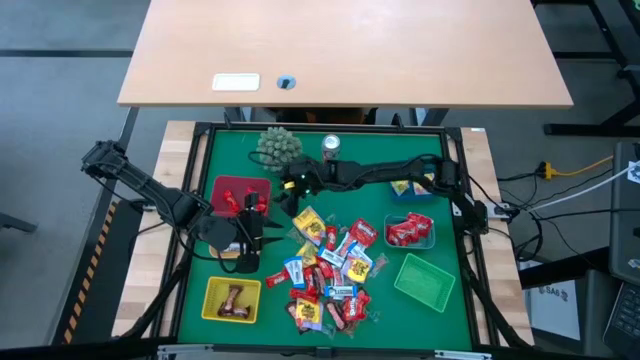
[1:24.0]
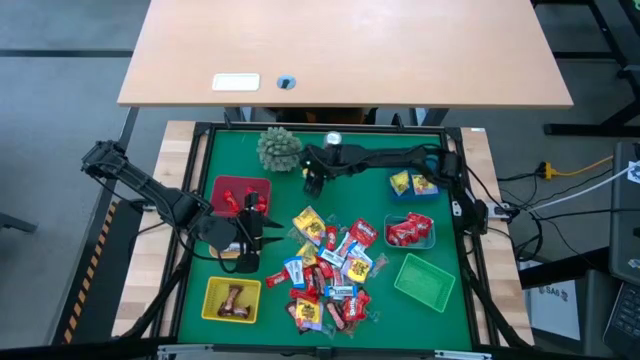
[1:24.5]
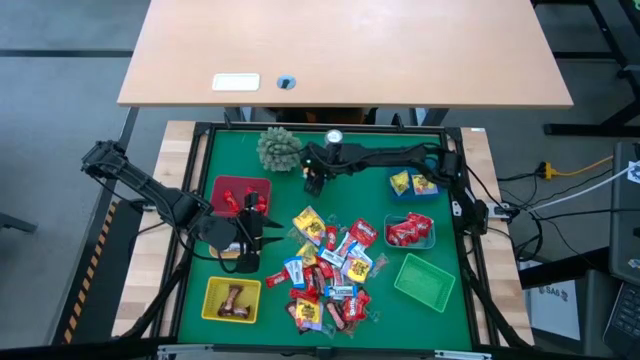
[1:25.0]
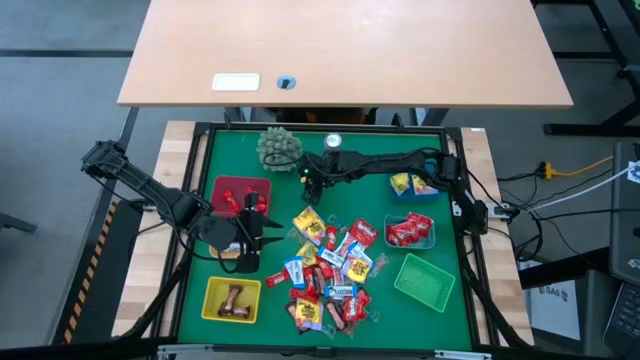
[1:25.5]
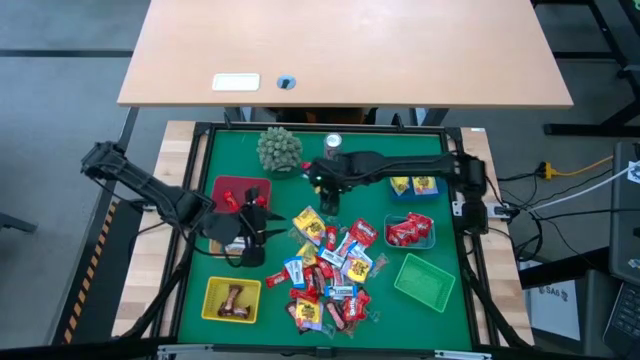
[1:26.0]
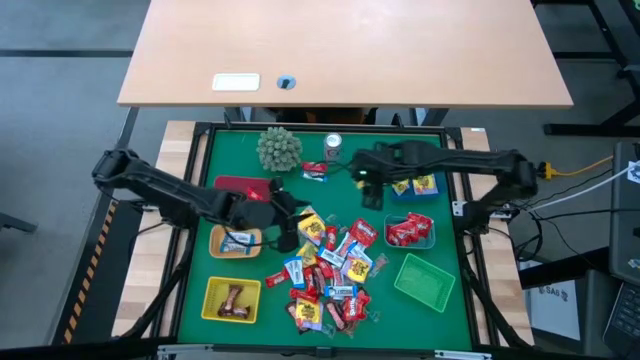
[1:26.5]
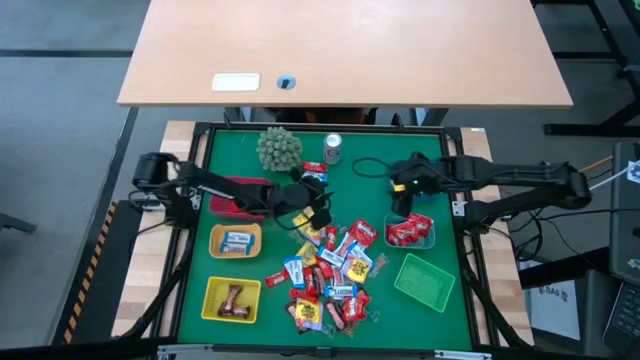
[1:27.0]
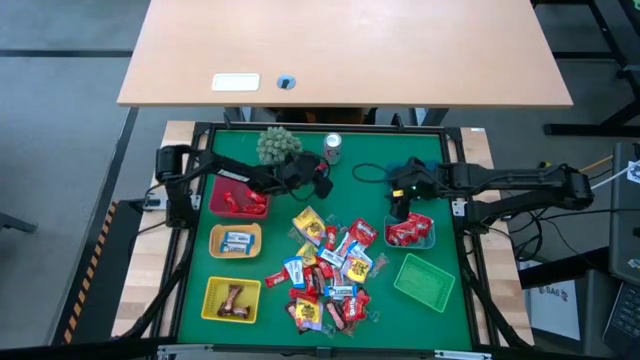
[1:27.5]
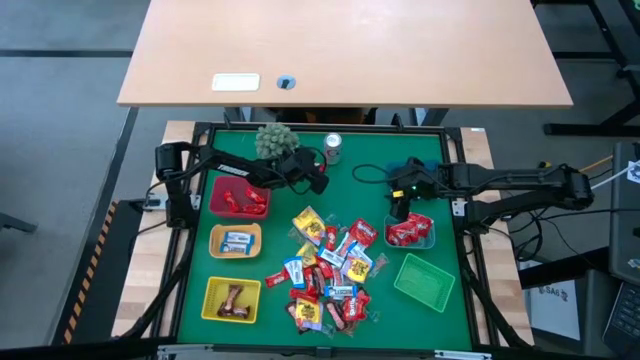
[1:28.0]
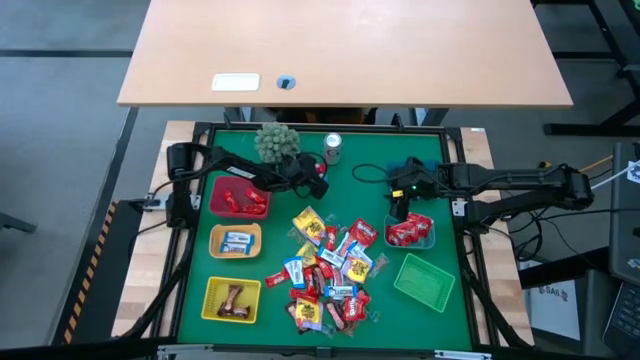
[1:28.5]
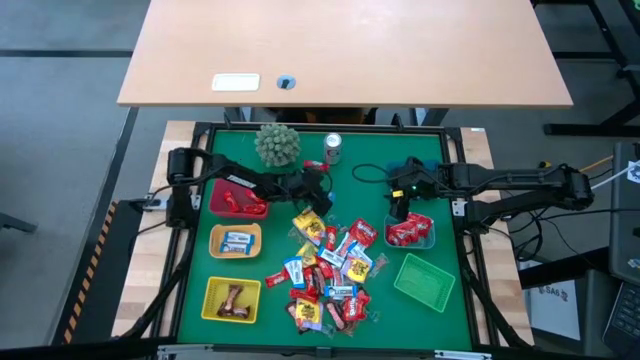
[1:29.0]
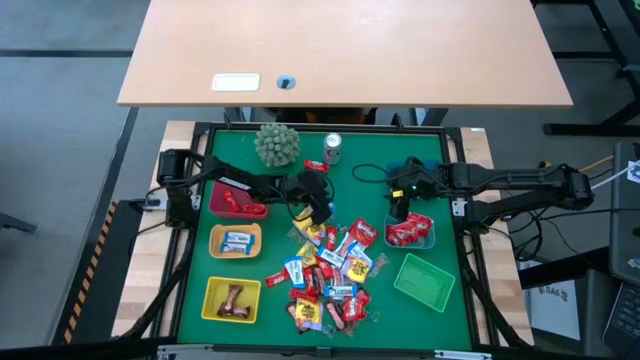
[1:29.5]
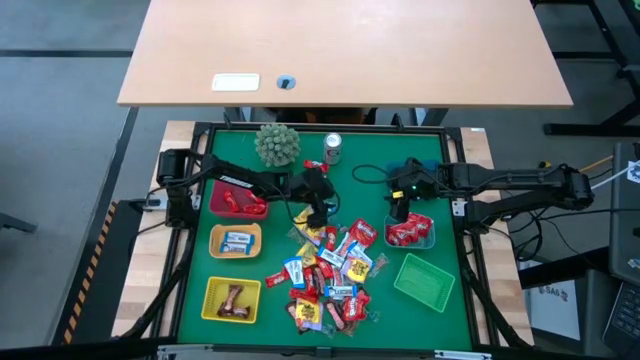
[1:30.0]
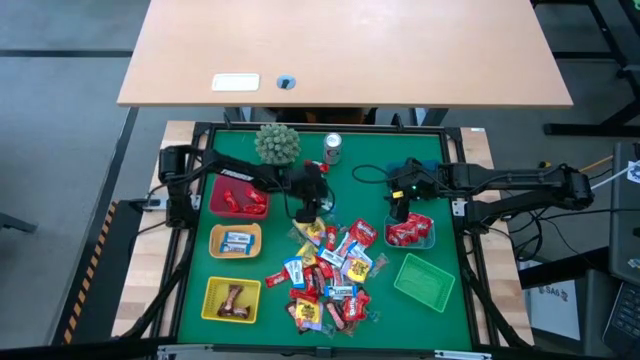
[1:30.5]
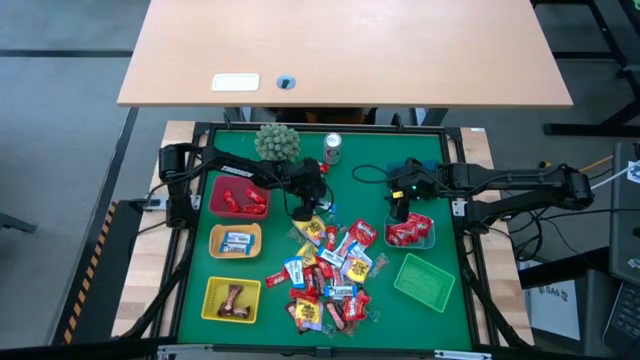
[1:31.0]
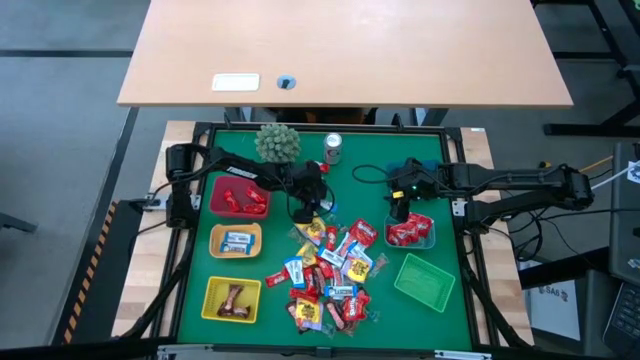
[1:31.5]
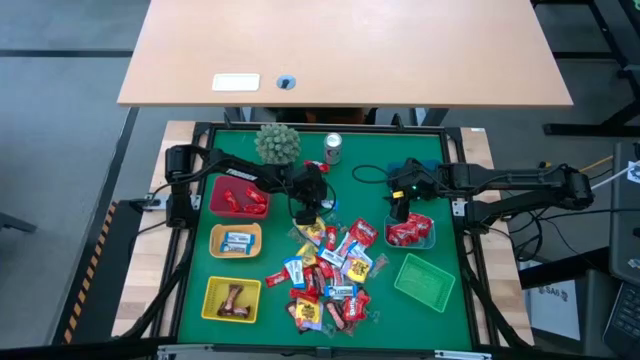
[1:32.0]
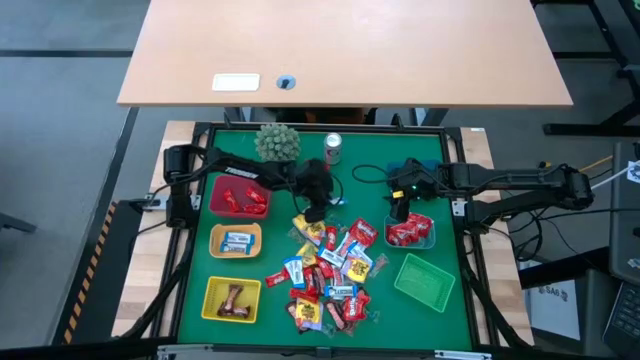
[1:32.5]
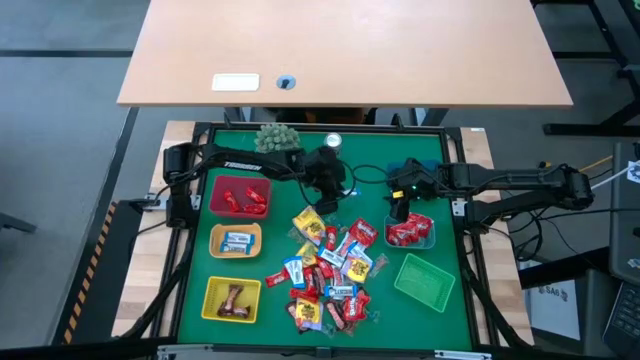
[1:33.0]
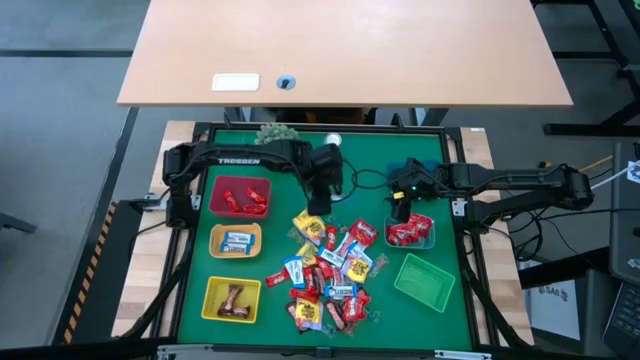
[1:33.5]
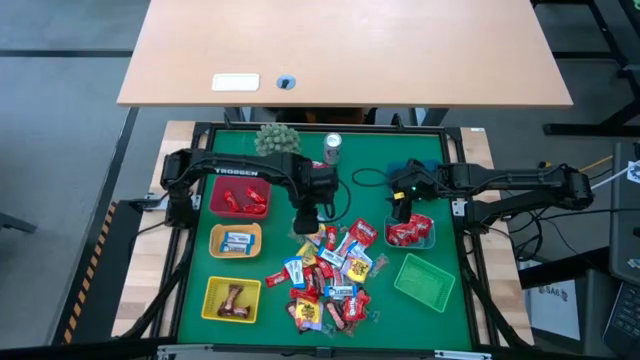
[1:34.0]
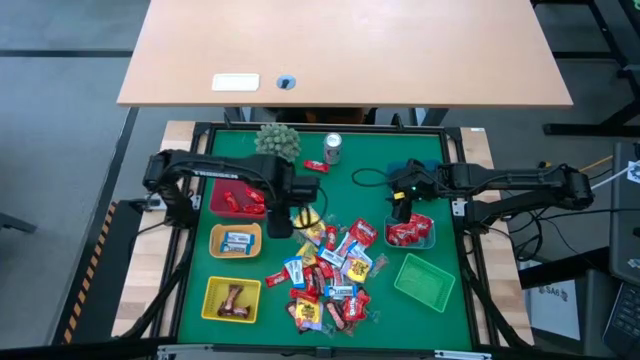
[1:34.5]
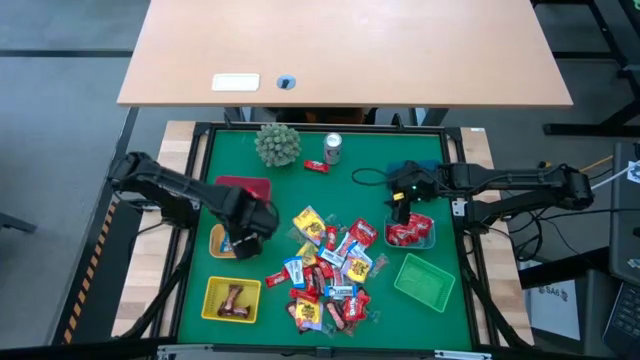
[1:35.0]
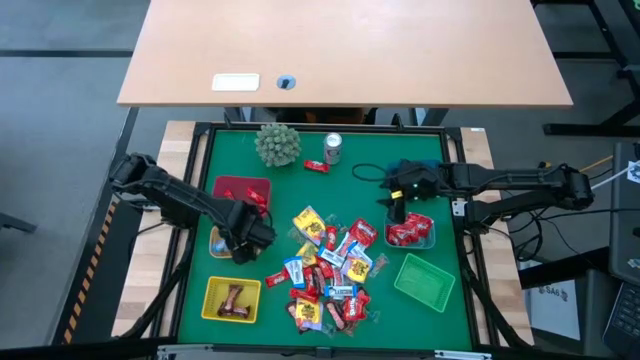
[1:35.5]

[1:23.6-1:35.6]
Task: Sort candy
Put the white chocolate bar into the orange bin

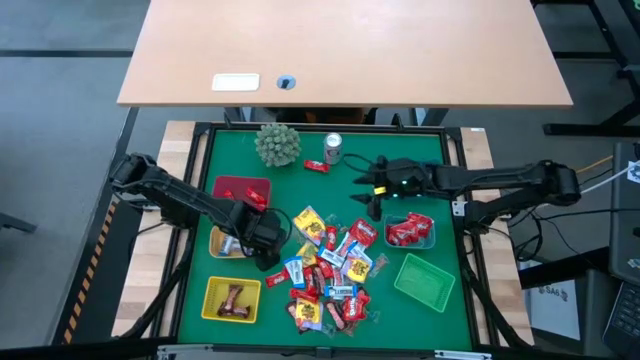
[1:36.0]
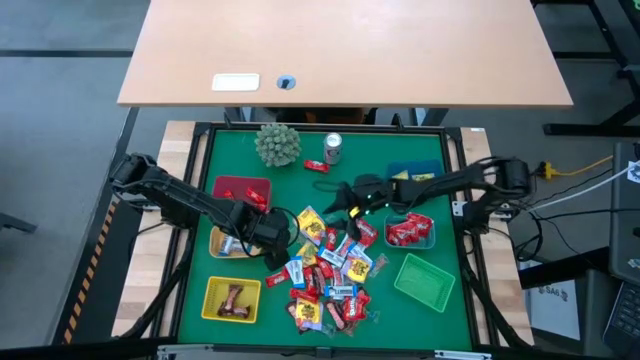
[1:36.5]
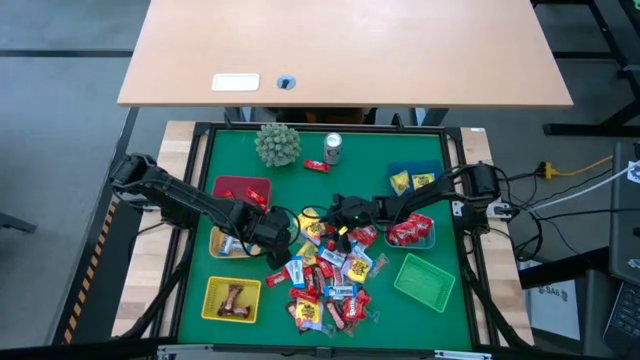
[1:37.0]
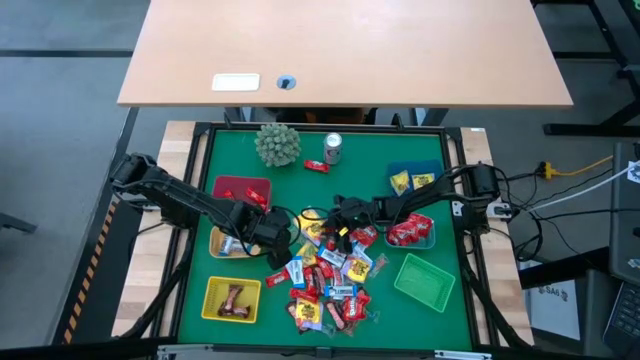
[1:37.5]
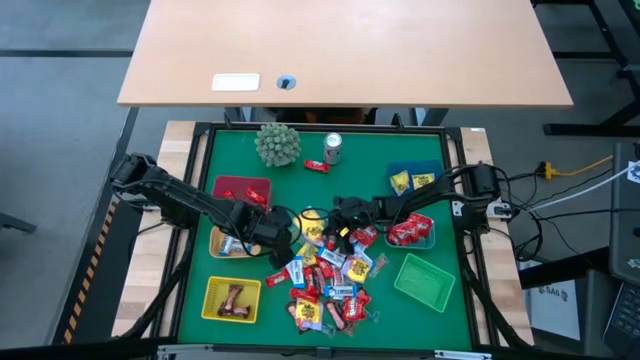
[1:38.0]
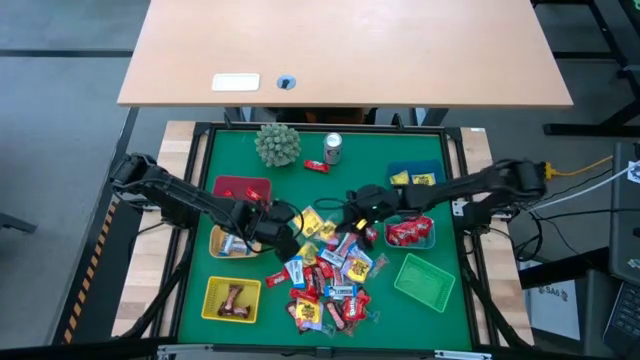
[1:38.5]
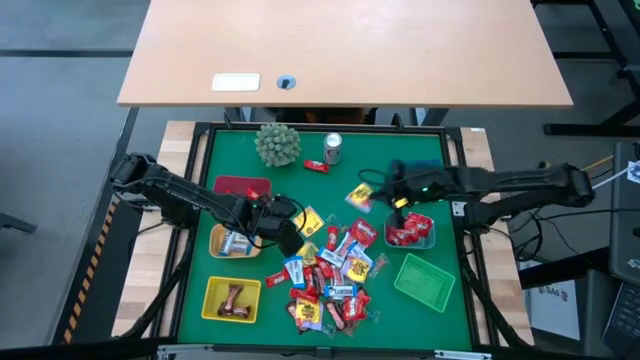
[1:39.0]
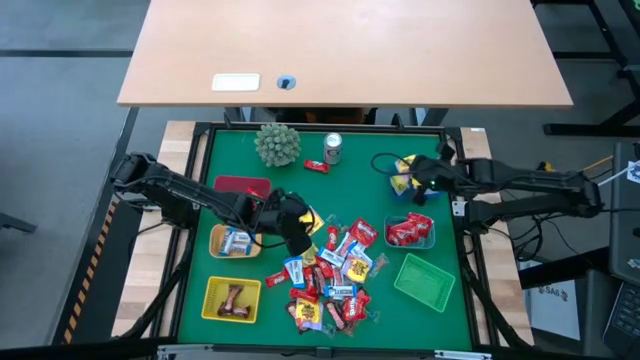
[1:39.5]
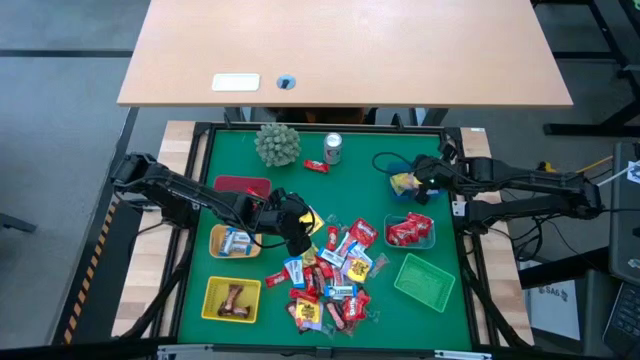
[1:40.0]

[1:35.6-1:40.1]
Put the yellow candy into the dark blue bin
